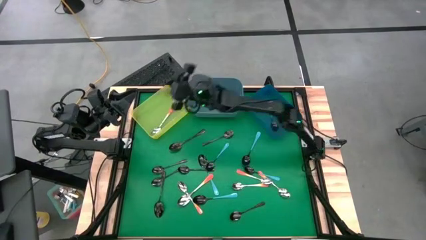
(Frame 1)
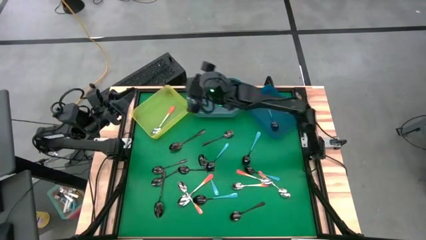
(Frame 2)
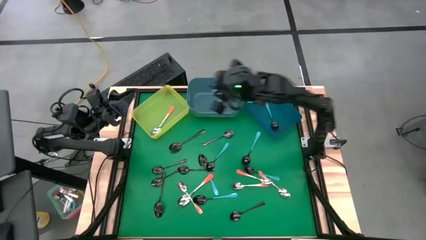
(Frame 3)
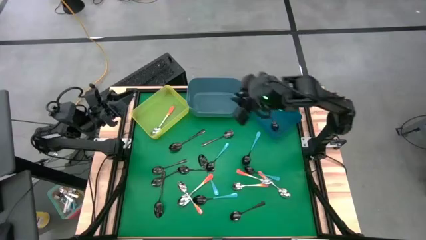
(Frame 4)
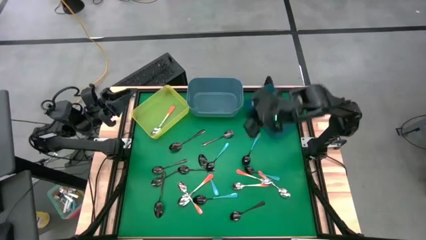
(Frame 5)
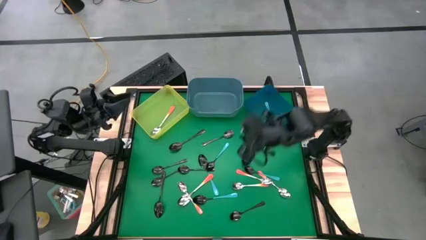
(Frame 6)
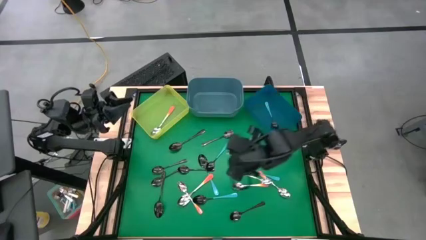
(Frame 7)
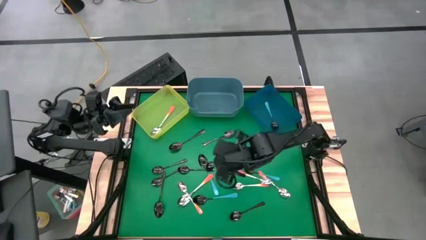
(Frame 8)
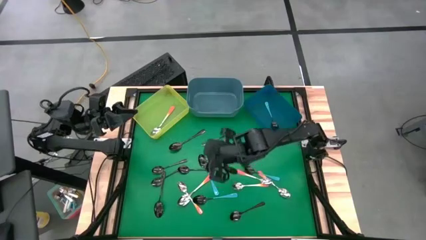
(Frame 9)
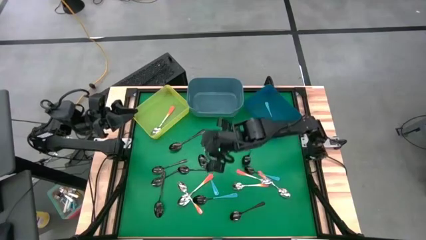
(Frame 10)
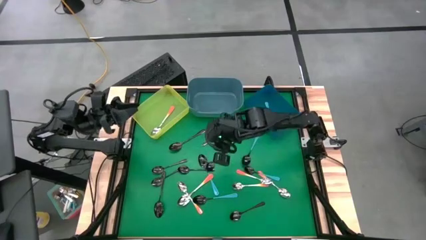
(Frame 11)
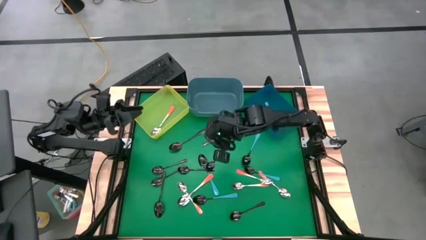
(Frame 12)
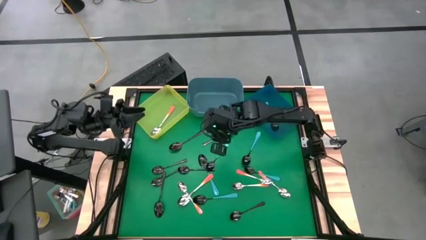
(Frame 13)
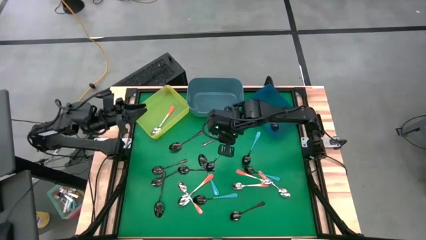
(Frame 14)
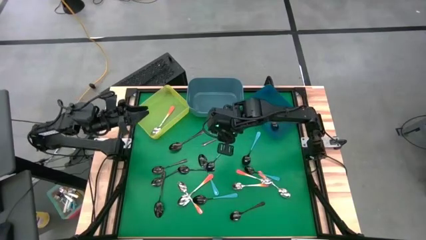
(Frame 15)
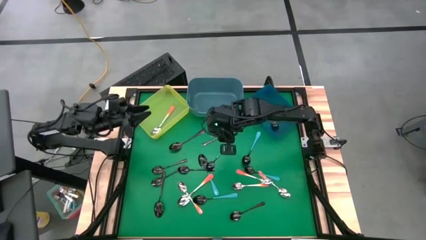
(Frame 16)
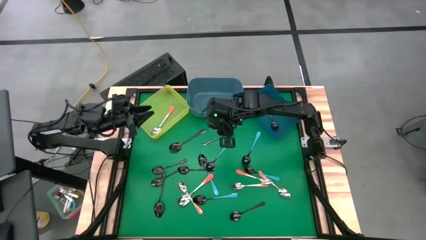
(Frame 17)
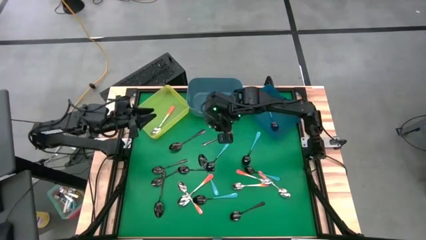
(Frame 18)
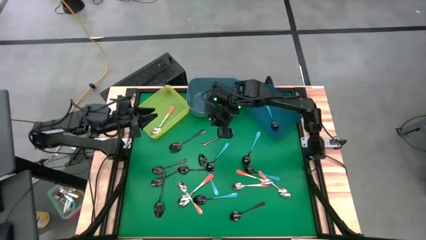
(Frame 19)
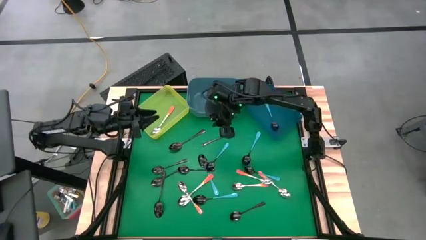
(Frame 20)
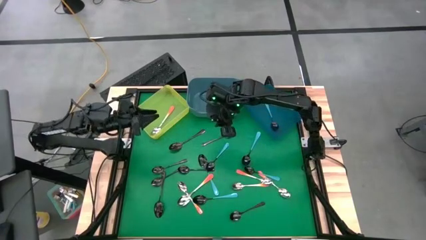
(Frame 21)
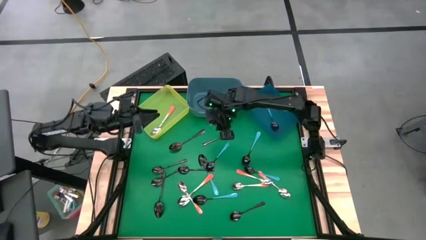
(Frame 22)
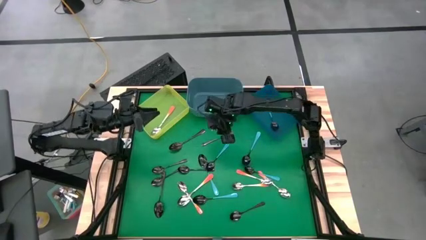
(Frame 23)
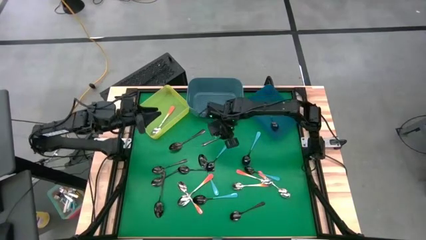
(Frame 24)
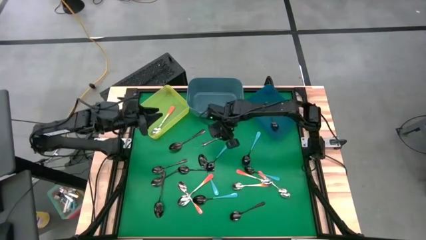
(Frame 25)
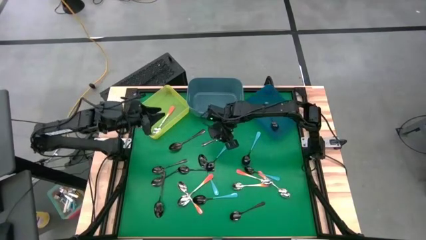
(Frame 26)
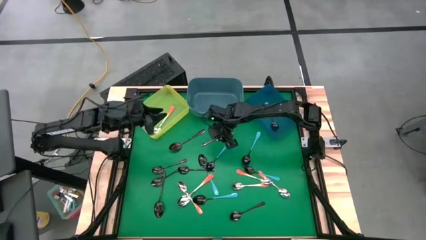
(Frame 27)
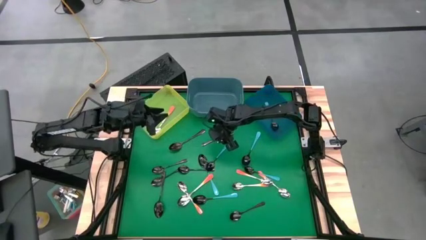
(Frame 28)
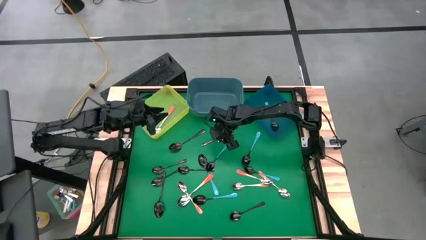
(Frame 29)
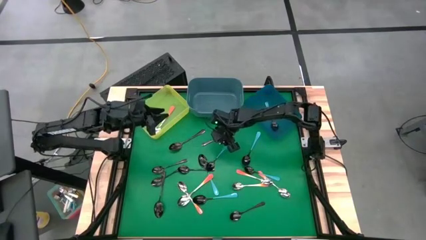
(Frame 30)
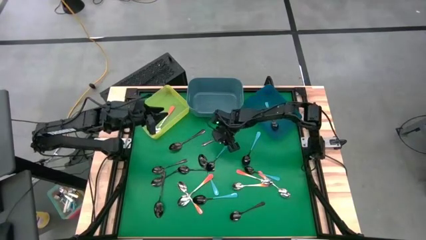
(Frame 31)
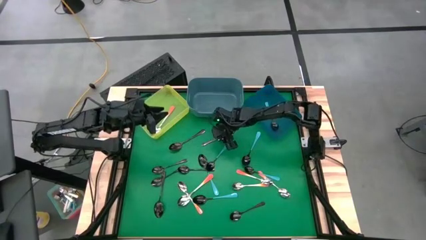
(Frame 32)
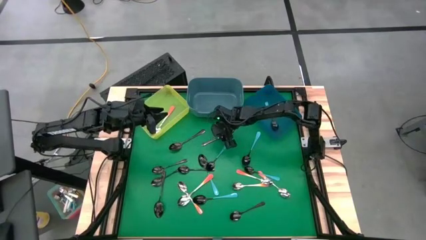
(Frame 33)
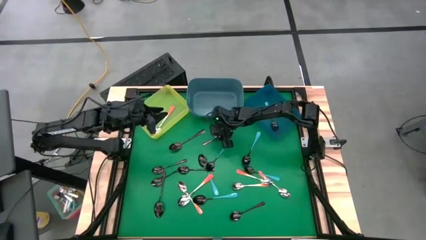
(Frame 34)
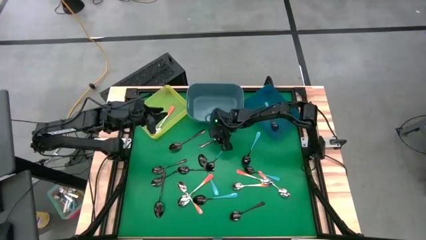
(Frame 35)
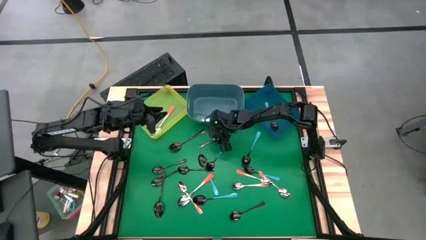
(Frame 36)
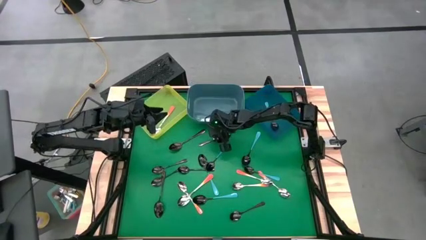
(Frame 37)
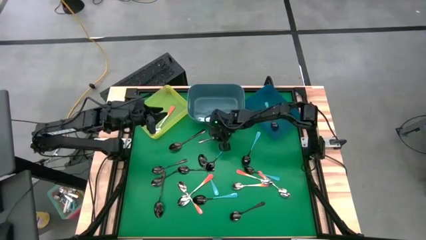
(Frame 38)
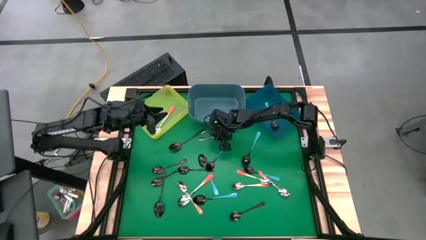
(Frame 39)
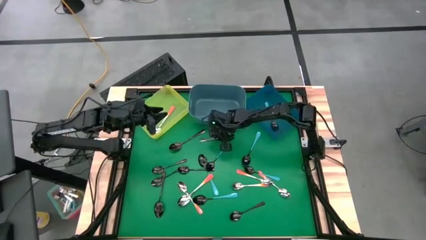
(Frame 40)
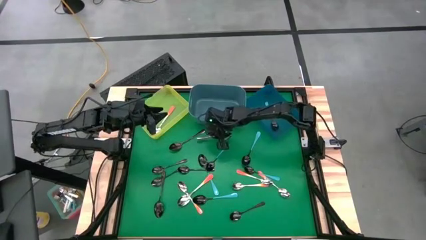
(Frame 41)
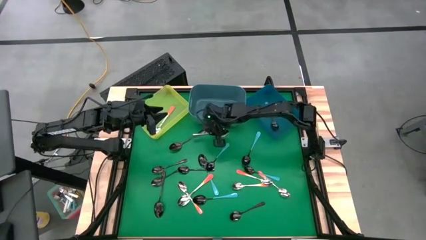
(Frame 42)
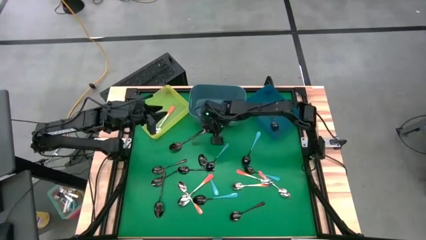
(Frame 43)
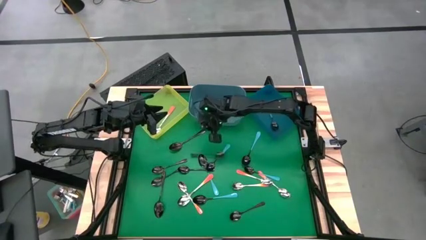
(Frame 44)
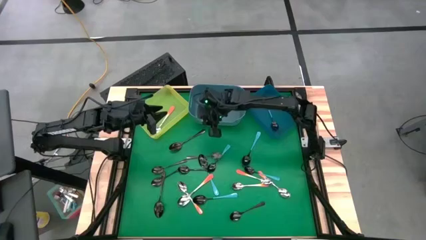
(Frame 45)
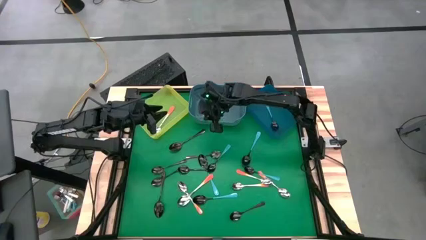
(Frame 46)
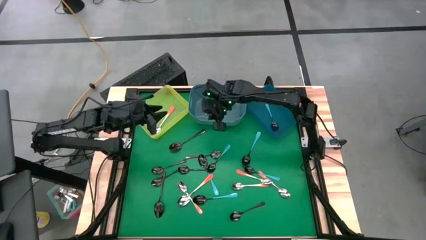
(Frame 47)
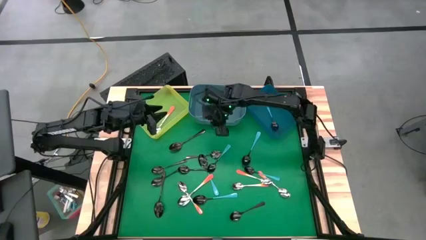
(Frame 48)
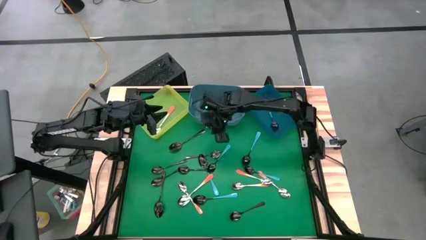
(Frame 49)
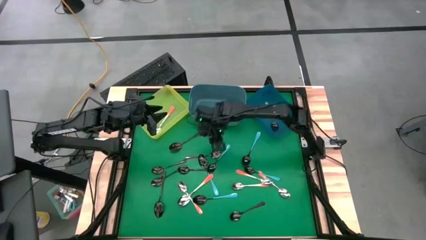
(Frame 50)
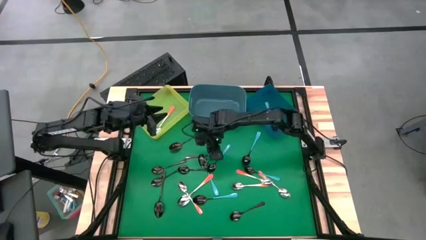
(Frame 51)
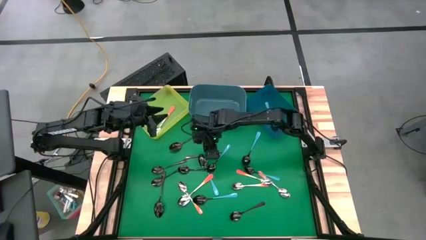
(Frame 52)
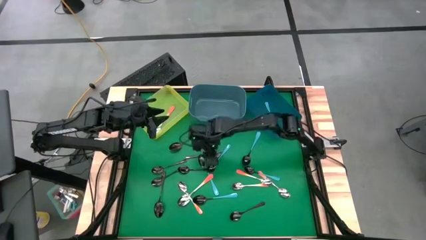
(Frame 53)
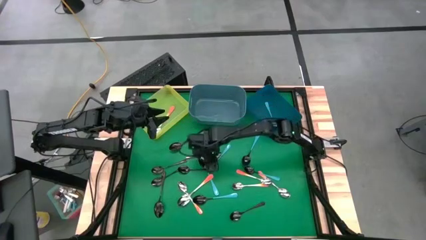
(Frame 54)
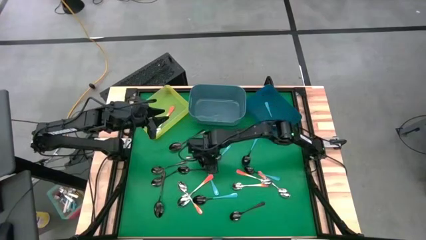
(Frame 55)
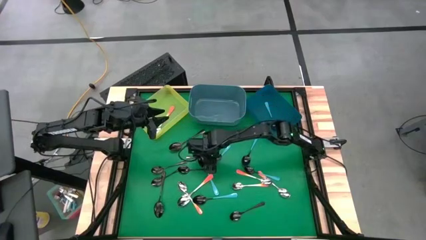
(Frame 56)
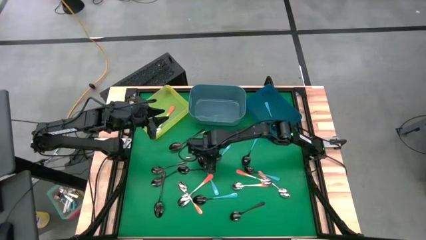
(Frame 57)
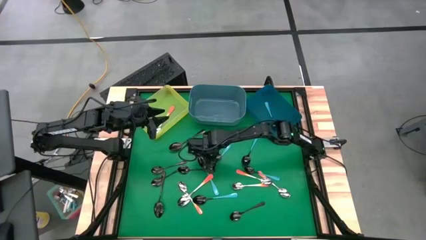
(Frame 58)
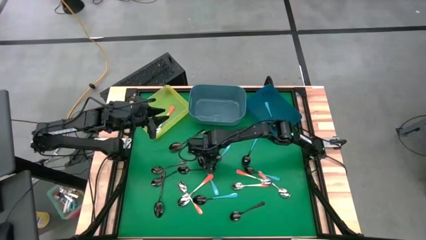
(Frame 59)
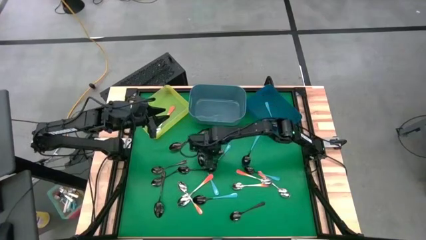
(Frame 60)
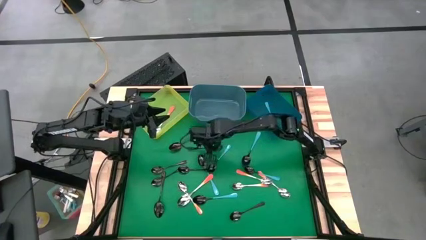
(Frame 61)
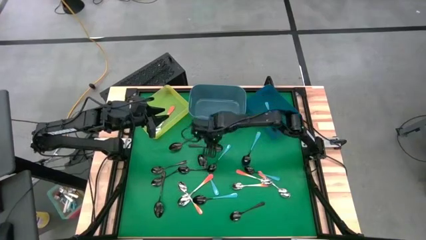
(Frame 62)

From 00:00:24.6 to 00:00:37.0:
Task: Sort silverware by color (type)
Put the black spoon into the light blue bin

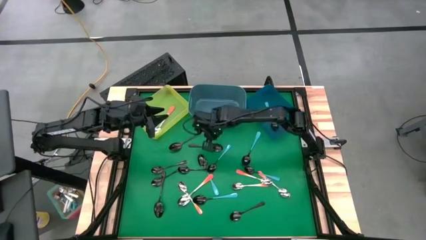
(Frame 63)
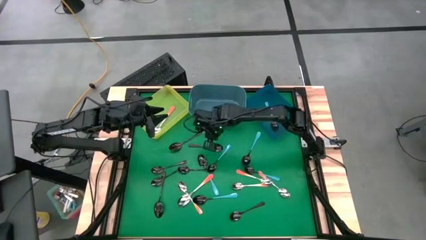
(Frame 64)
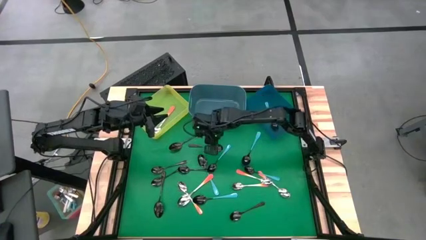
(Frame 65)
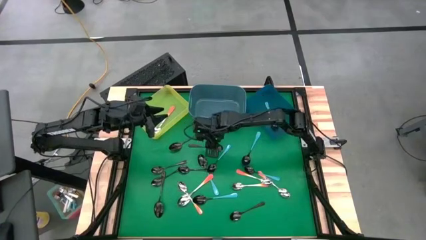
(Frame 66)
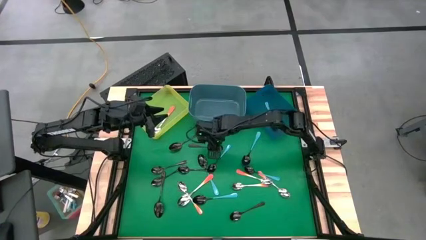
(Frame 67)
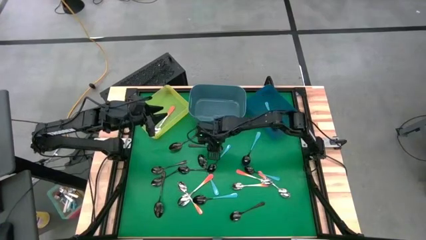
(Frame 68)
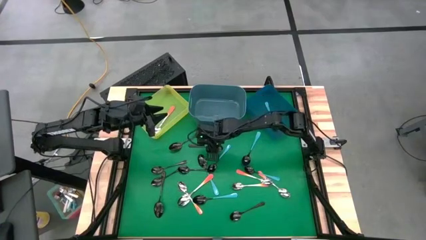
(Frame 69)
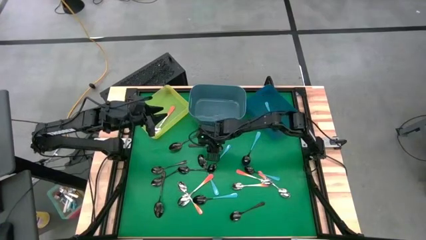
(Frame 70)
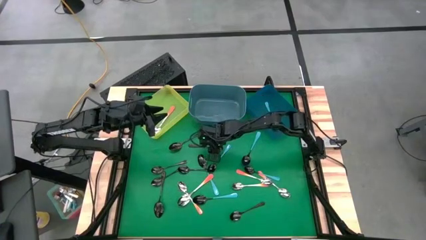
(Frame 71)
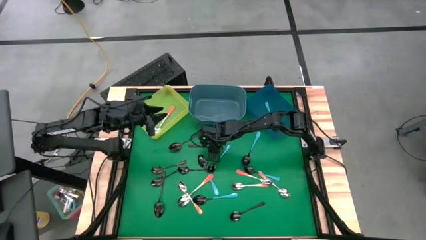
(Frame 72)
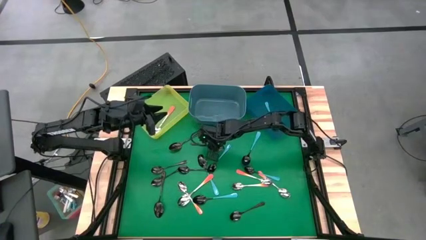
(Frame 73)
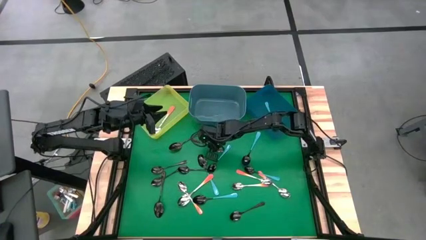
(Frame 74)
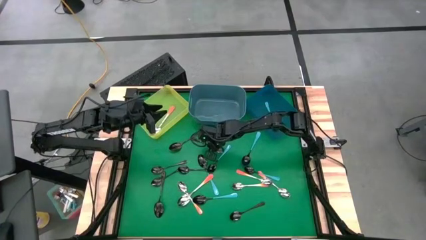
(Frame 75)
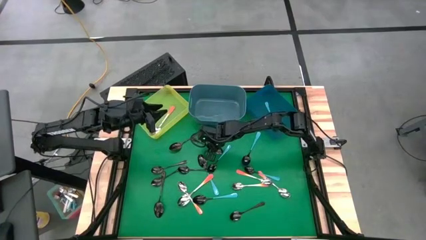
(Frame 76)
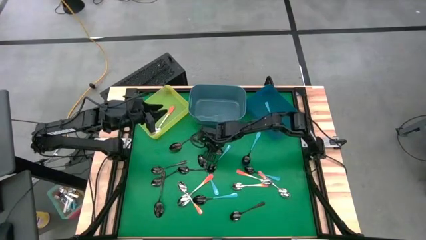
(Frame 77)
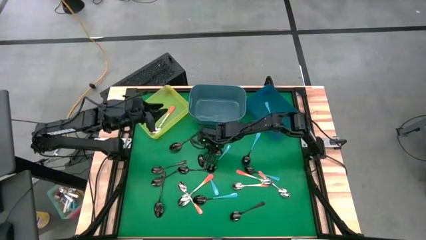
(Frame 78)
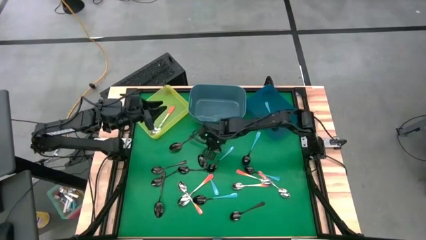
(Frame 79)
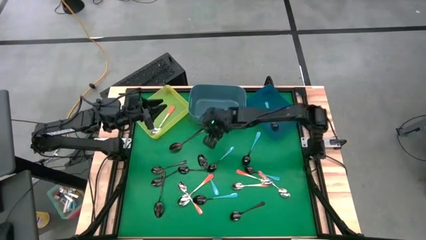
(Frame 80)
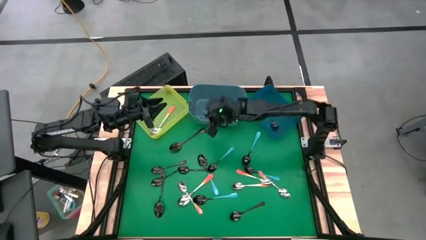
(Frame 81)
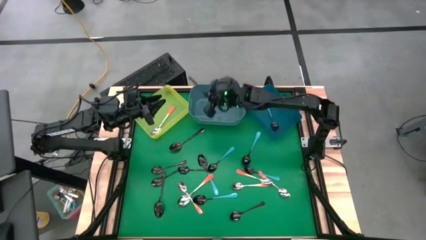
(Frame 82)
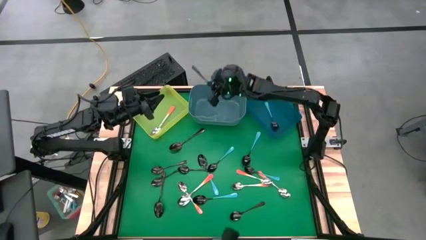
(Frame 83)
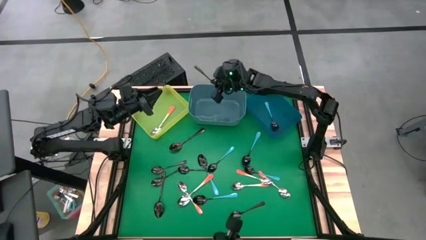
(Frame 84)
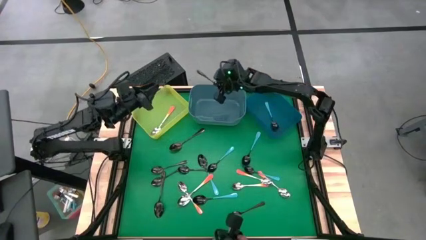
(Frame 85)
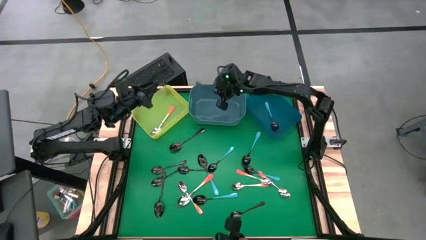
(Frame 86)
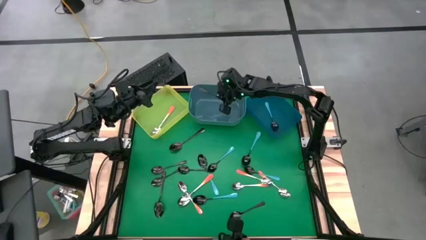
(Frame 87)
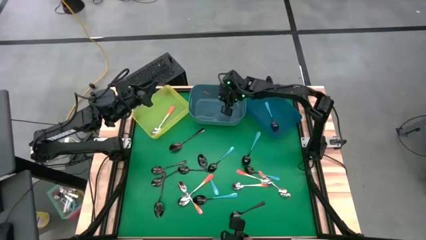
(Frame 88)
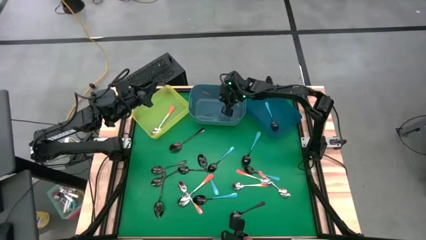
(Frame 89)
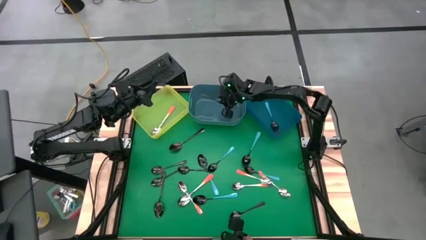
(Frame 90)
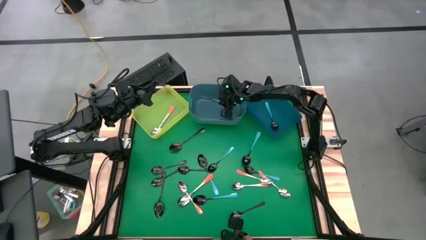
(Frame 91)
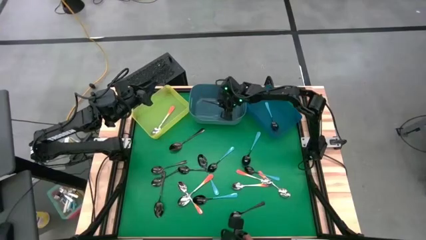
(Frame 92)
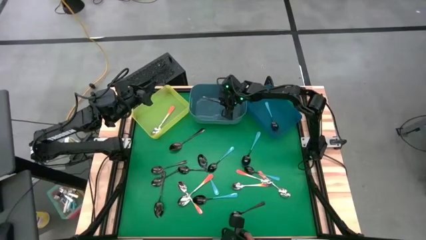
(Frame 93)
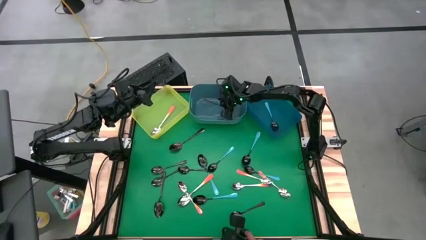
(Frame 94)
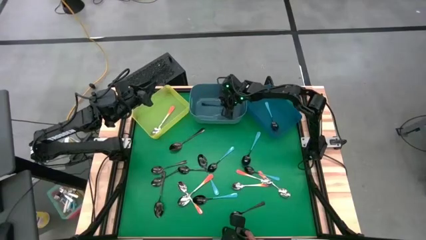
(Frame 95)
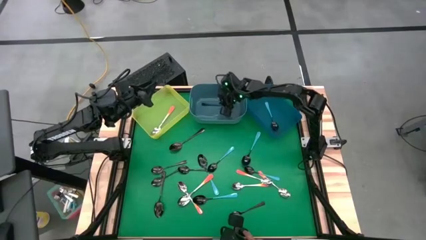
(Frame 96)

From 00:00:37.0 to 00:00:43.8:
Put the black spoon into the light blue bin
